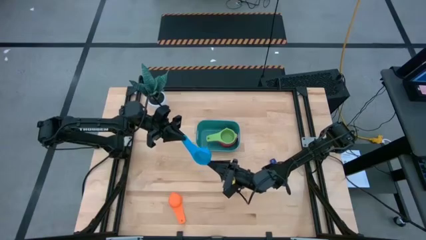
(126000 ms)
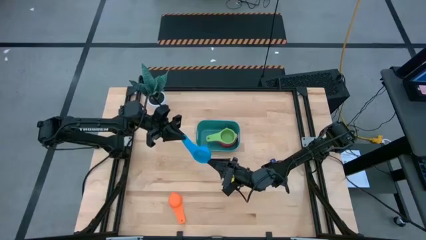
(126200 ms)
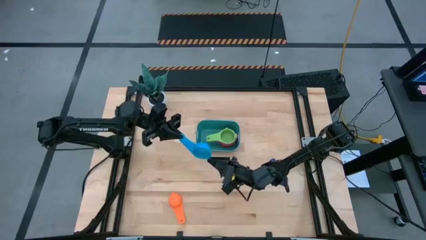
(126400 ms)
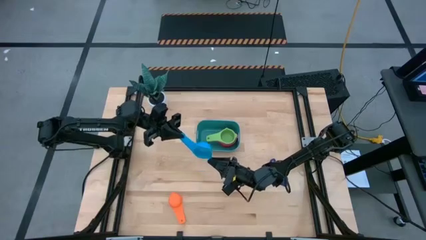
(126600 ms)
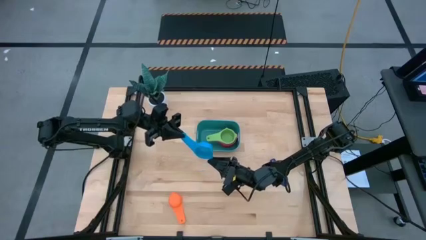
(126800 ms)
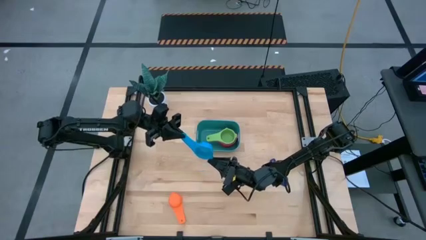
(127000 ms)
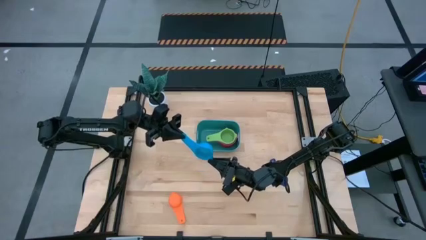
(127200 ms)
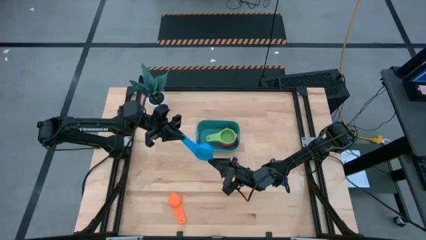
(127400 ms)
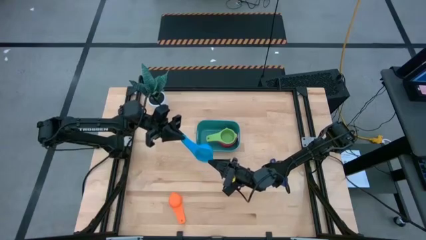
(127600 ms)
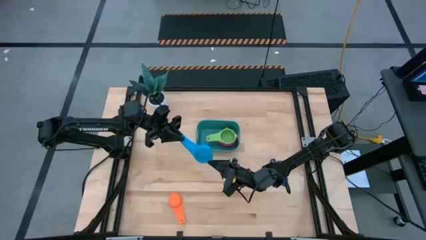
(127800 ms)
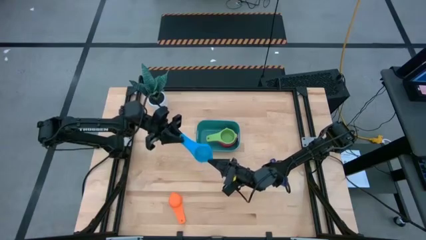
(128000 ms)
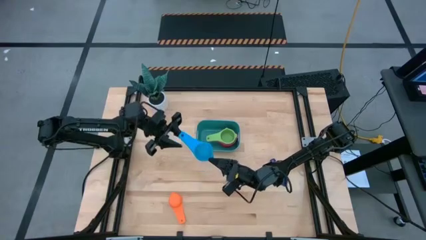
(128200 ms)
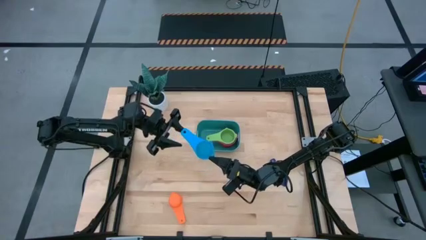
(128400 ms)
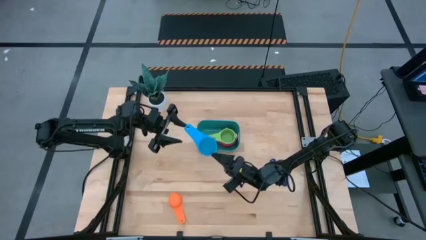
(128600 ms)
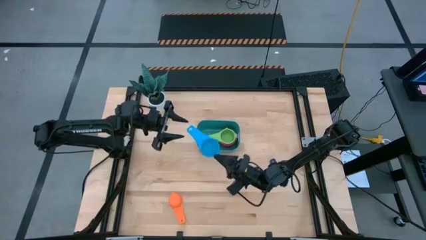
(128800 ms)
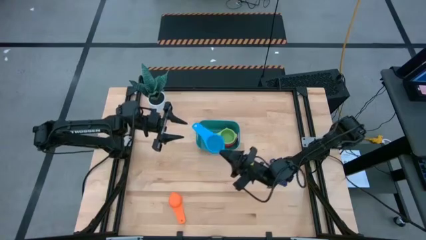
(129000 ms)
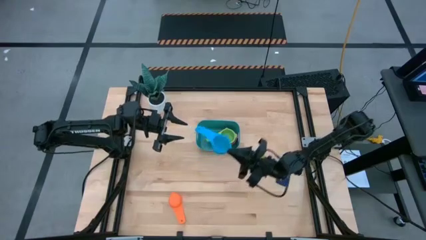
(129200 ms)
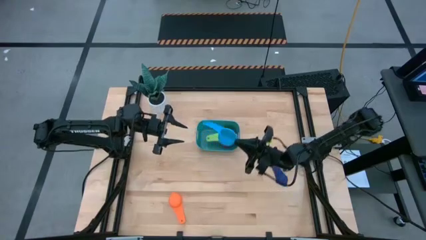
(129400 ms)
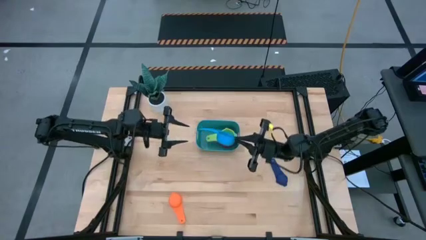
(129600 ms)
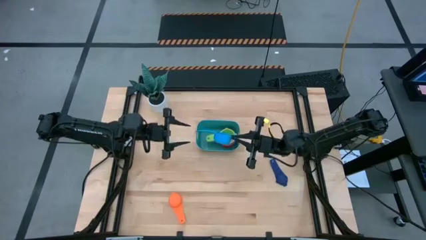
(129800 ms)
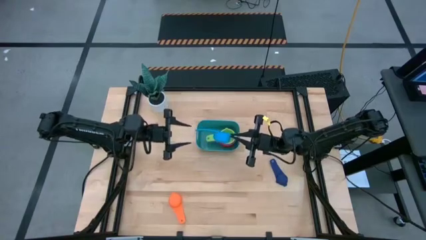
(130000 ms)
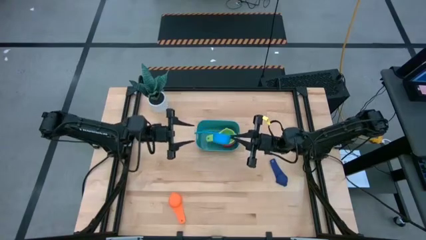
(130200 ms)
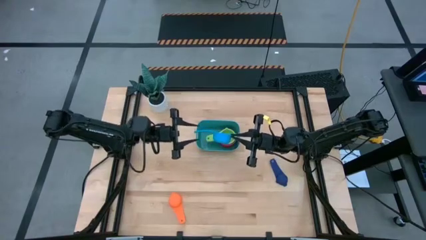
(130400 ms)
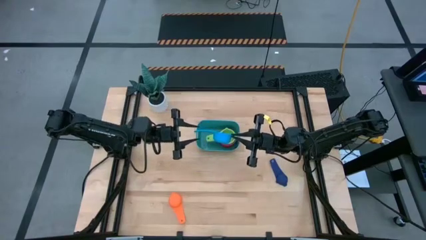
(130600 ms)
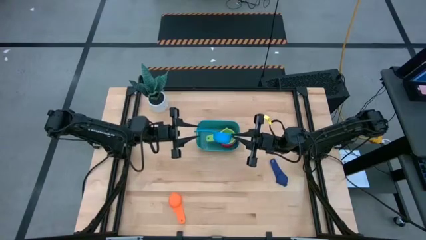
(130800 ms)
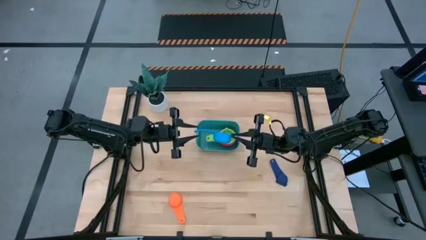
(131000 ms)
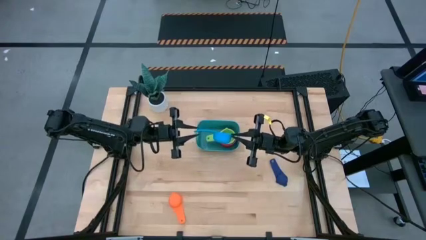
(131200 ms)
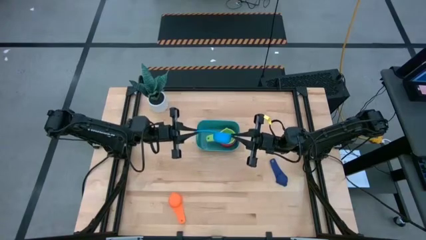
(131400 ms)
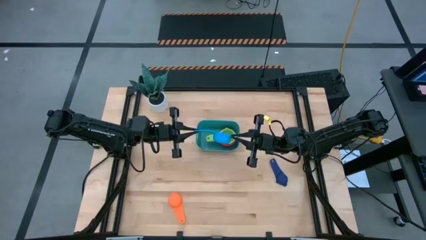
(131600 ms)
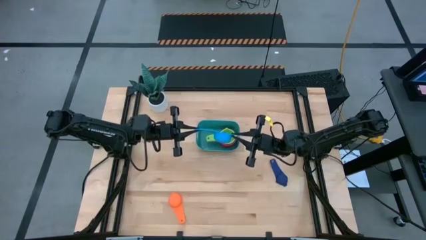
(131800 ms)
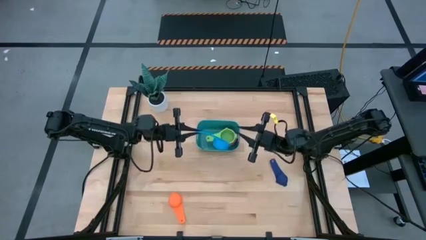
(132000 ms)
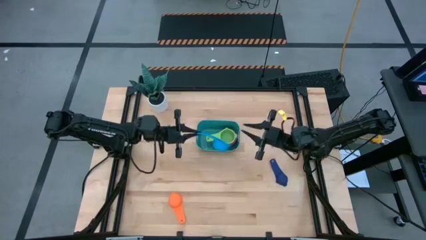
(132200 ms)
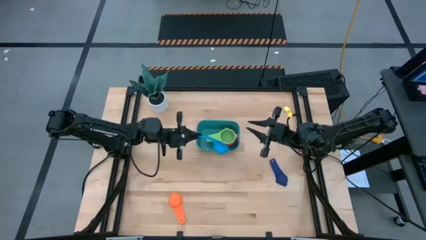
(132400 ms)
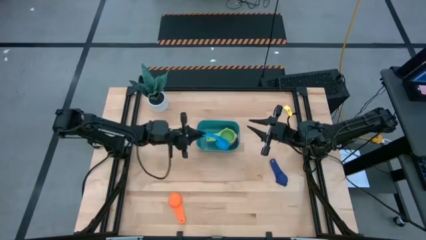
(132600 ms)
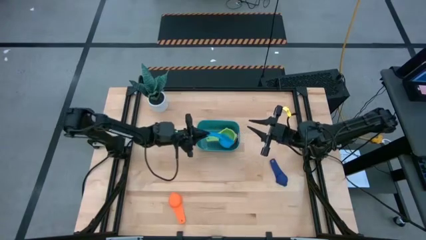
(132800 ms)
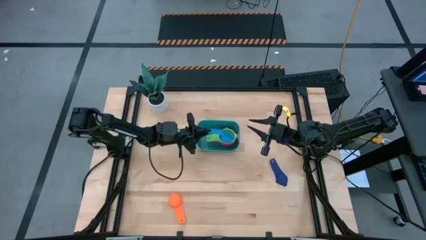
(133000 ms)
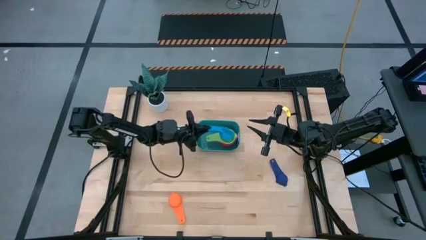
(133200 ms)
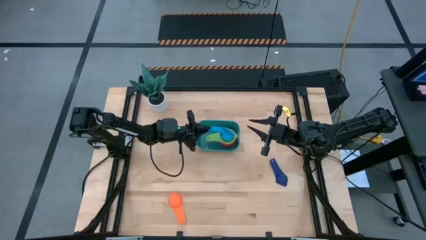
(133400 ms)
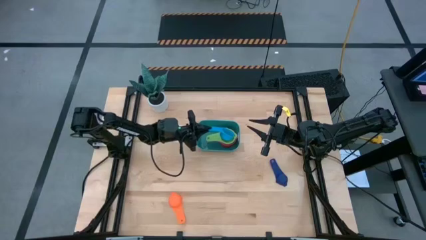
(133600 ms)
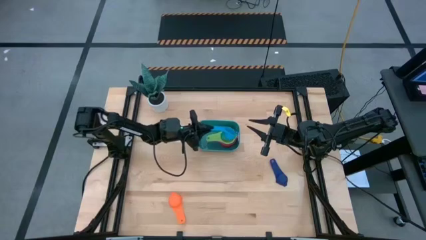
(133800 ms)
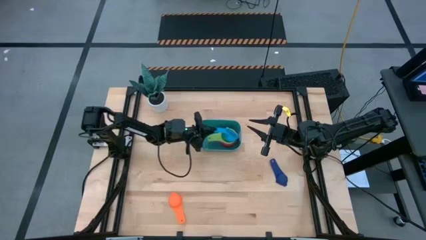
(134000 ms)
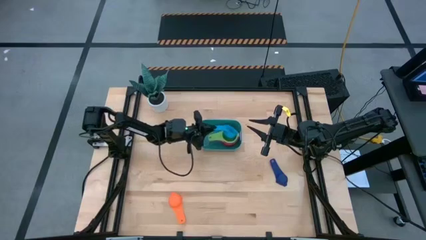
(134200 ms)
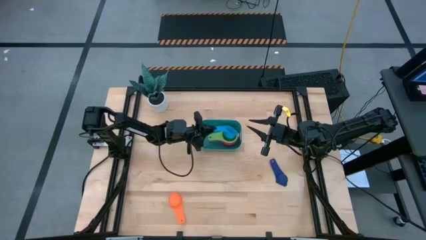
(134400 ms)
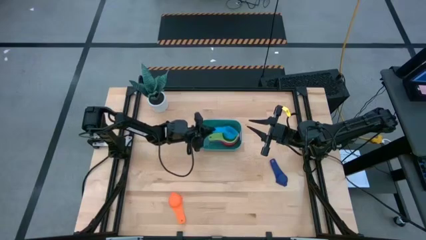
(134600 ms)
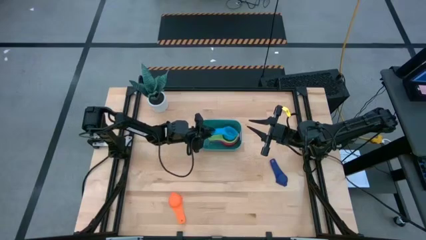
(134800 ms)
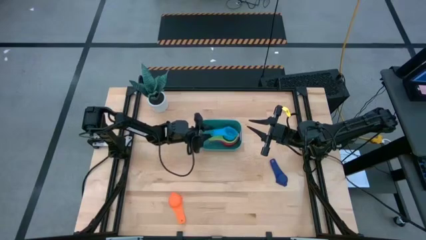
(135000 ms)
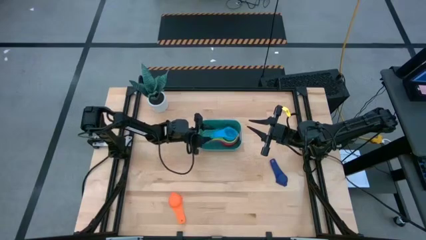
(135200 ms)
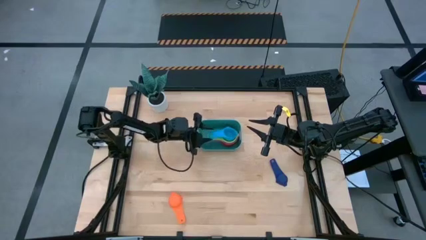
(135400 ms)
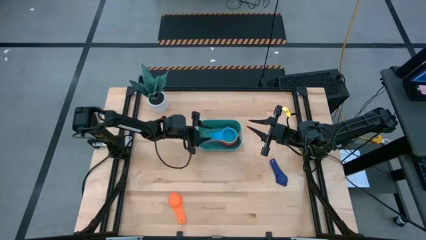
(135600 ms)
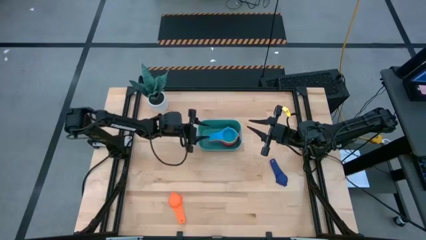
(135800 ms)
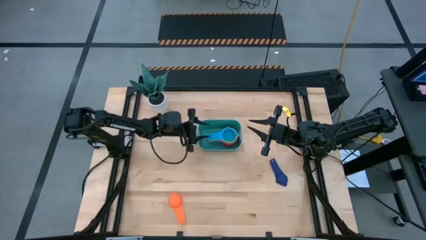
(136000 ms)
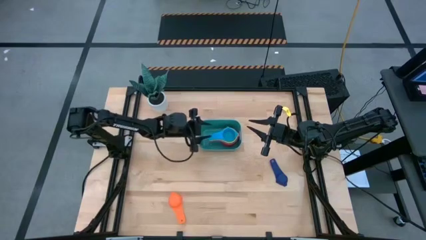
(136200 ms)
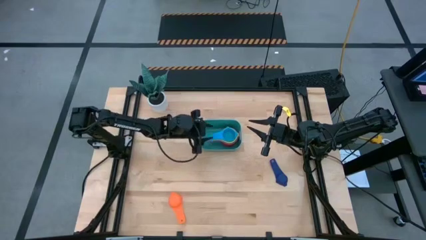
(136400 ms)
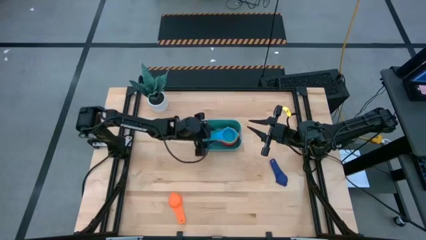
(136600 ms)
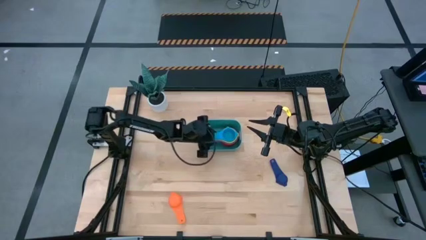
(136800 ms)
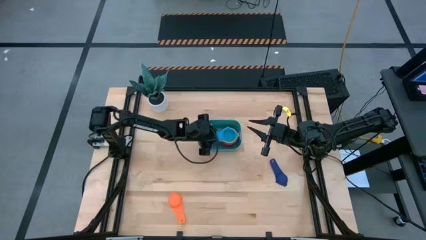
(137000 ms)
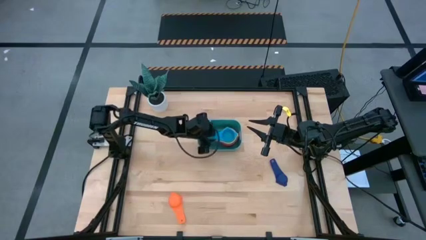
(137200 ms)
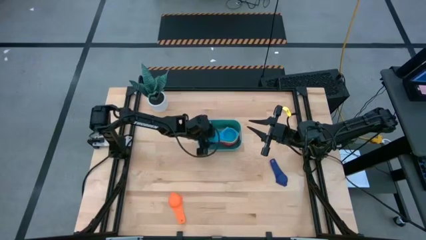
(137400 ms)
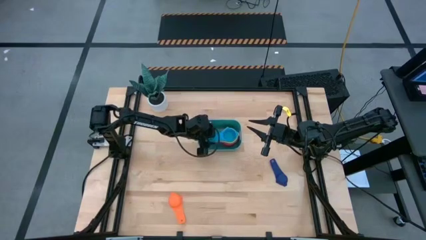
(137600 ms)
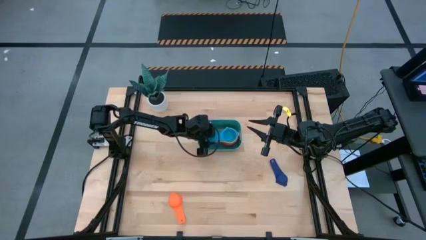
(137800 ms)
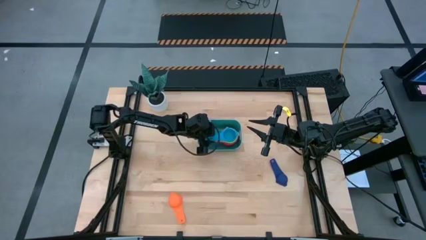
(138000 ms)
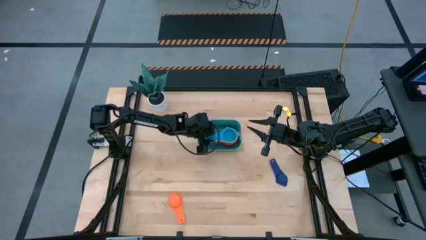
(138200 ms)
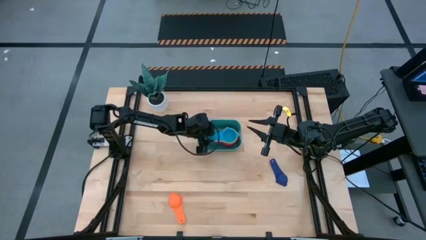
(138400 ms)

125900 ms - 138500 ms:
Task: Nest measuring cups in basket
Stack the light blue measuring cup on top of the green measuring cup inside the light blue bin
